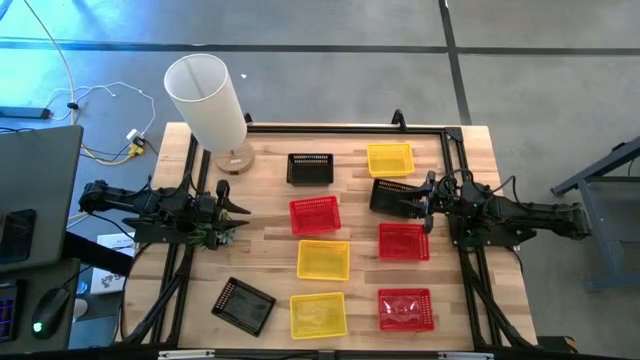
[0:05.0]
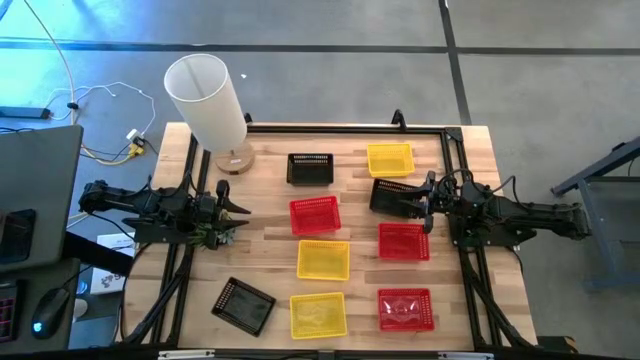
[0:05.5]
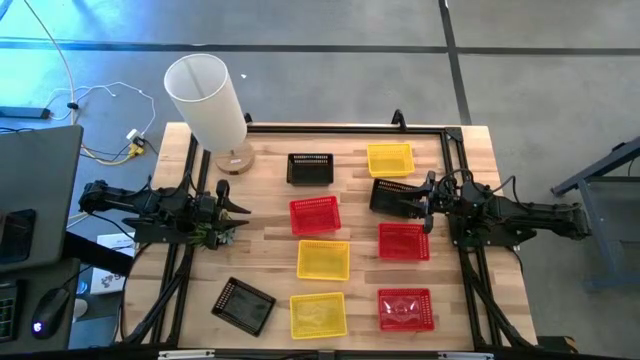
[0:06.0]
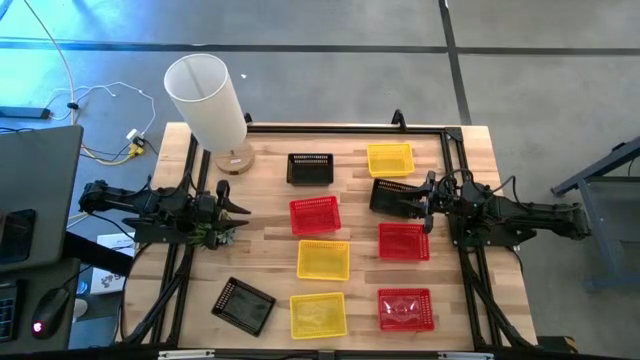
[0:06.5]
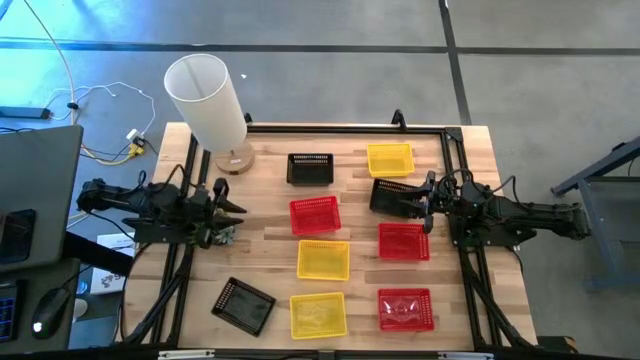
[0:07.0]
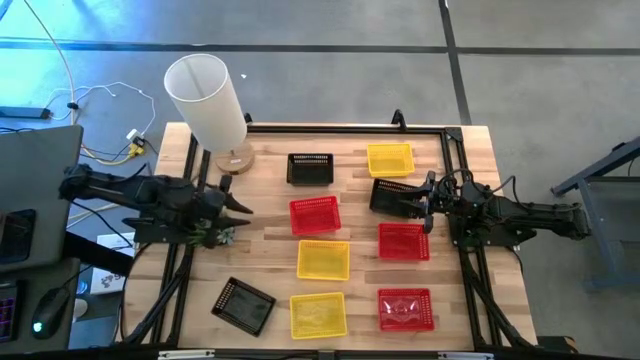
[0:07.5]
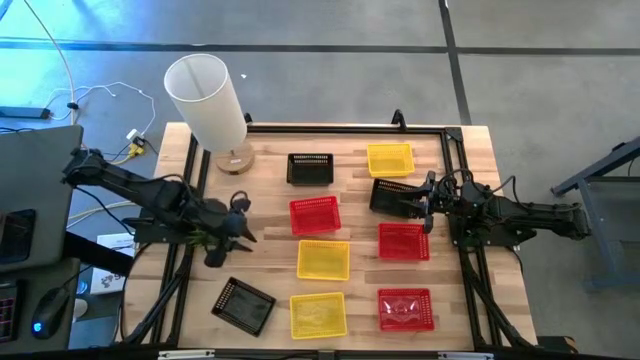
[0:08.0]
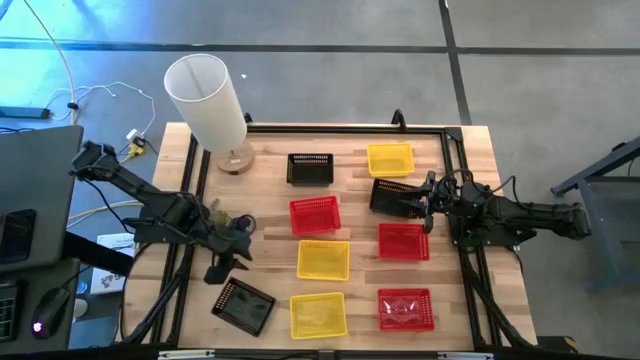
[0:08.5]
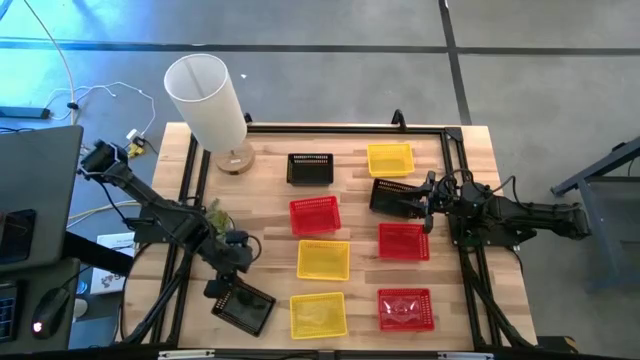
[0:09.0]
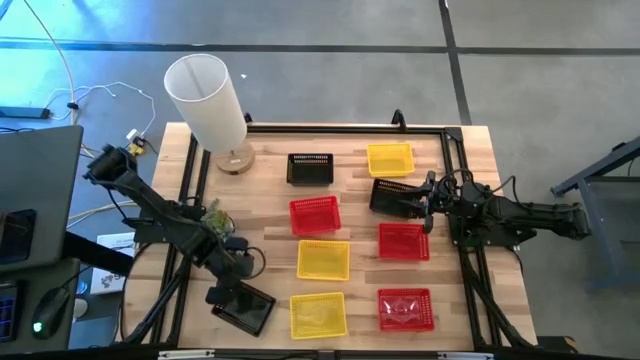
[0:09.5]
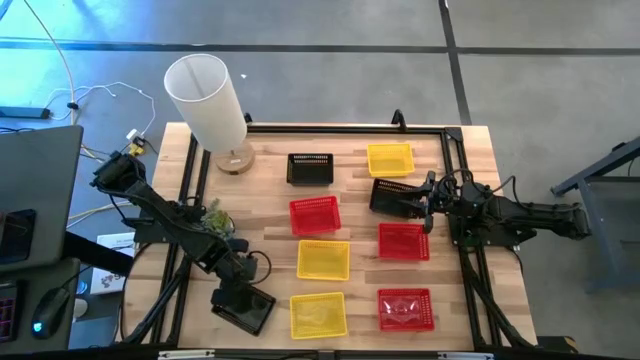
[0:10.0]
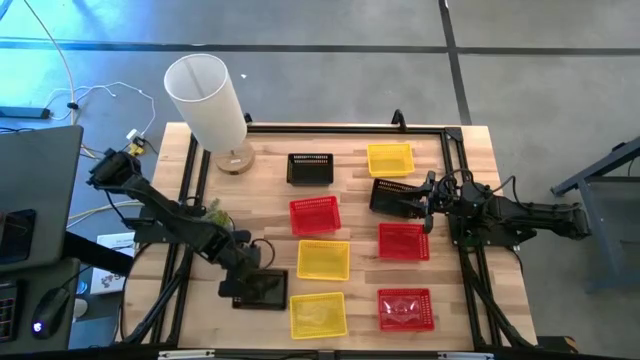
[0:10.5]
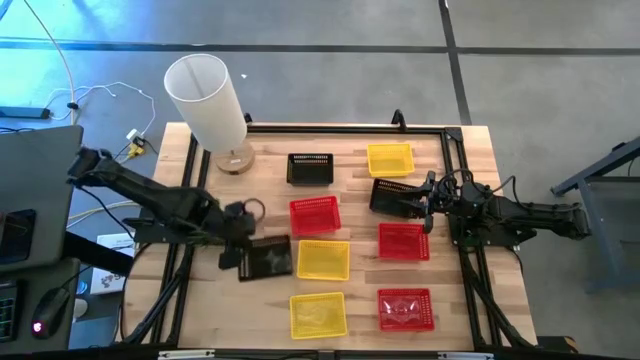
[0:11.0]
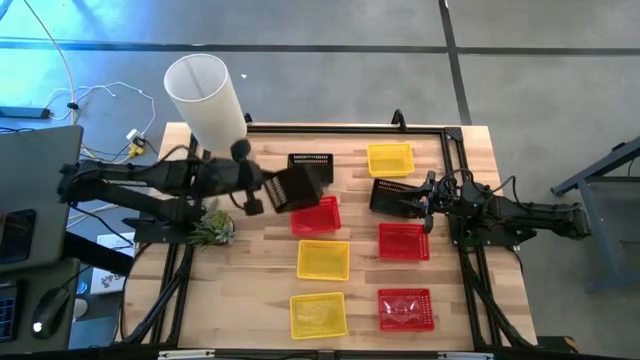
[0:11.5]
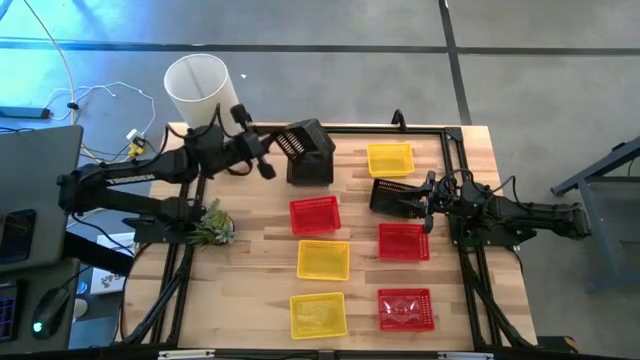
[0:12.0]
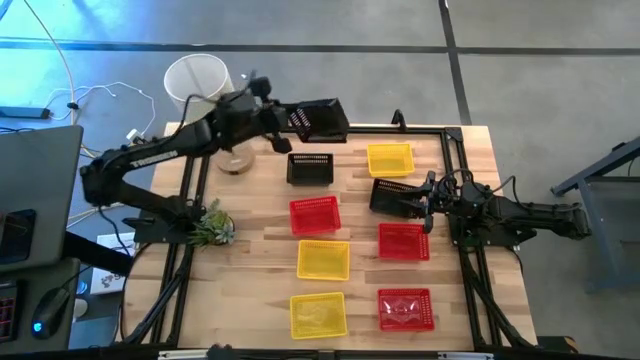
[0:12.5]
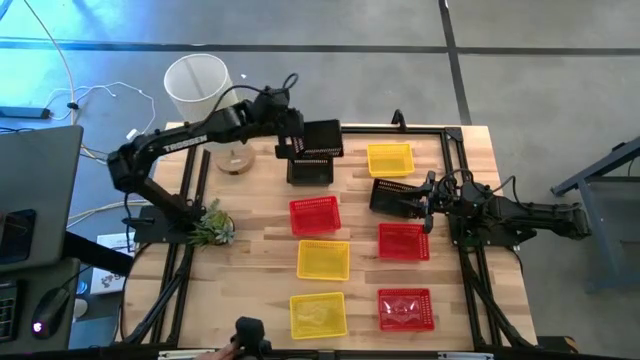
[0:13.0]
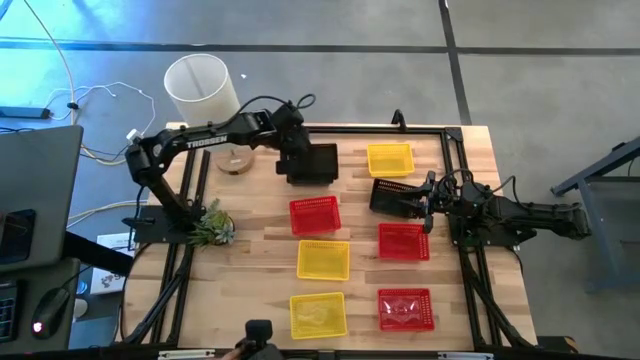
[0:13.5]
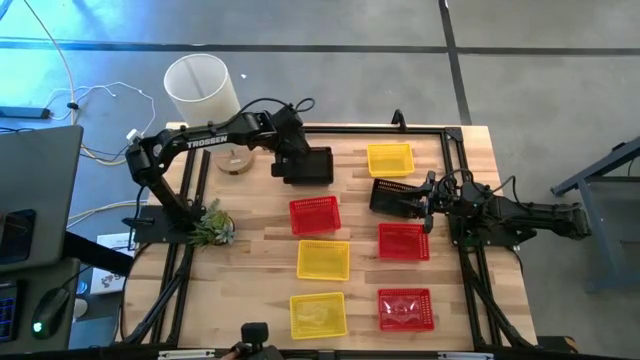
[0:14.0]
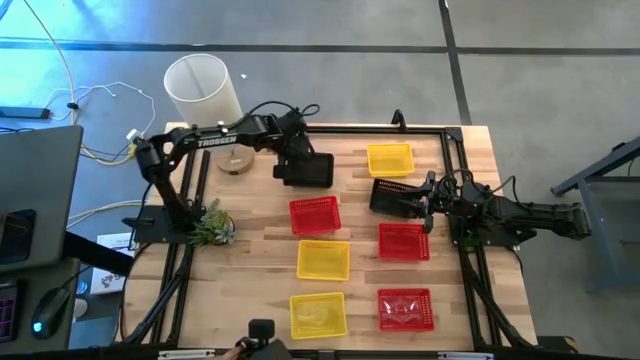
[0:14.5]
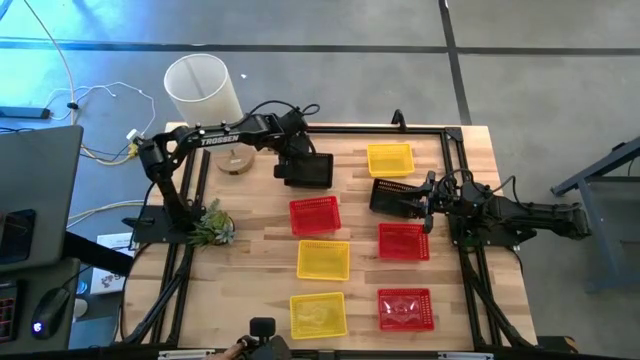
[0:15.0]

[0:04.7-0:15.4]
Stack the bottom black bin on top of the top black bin

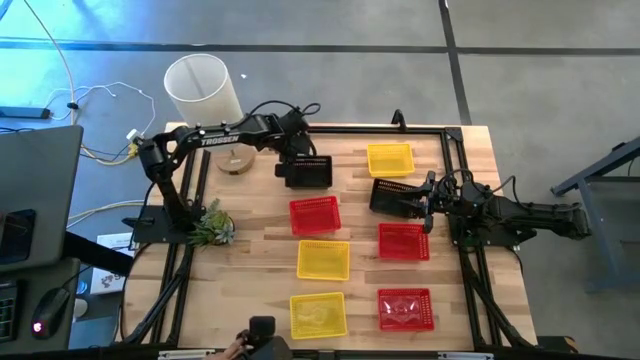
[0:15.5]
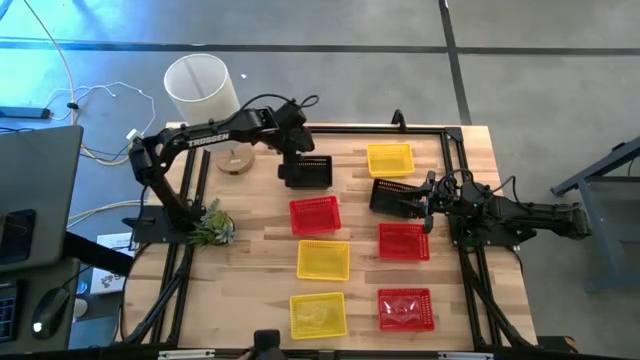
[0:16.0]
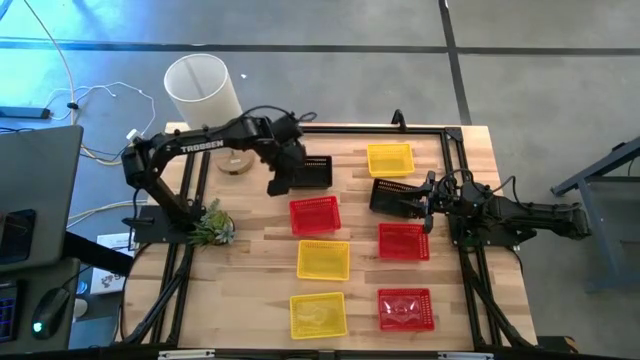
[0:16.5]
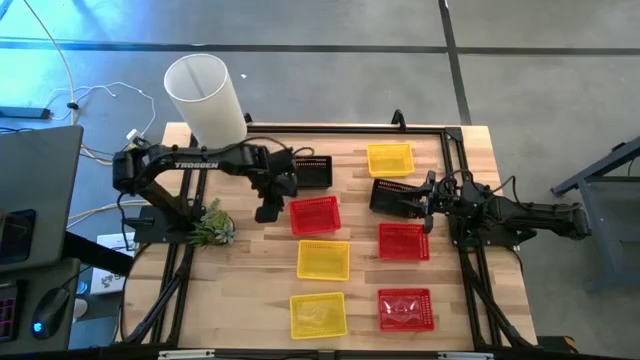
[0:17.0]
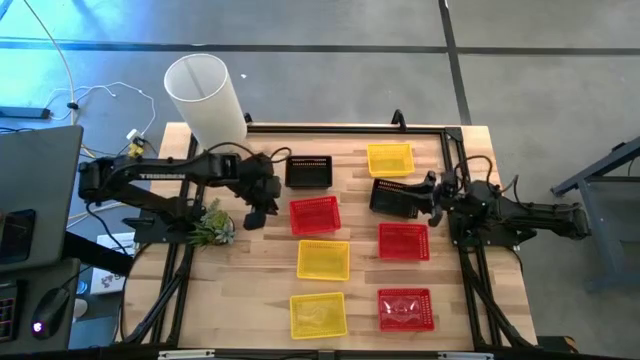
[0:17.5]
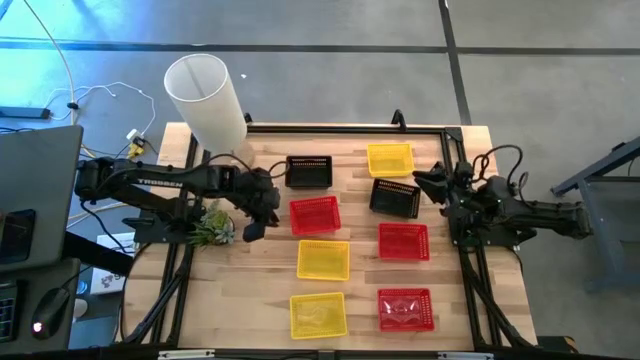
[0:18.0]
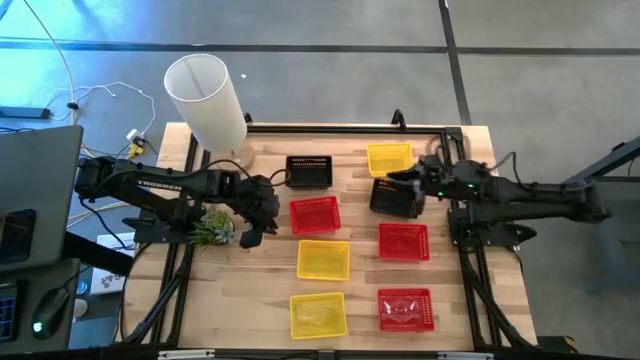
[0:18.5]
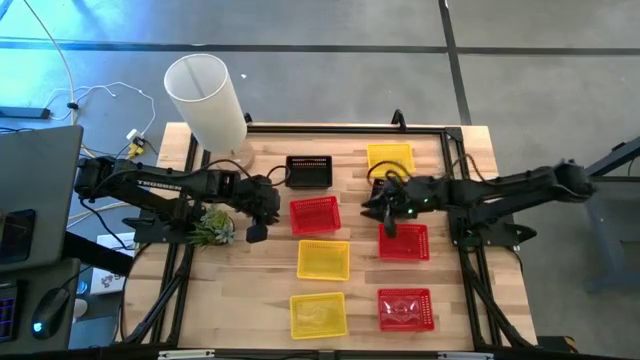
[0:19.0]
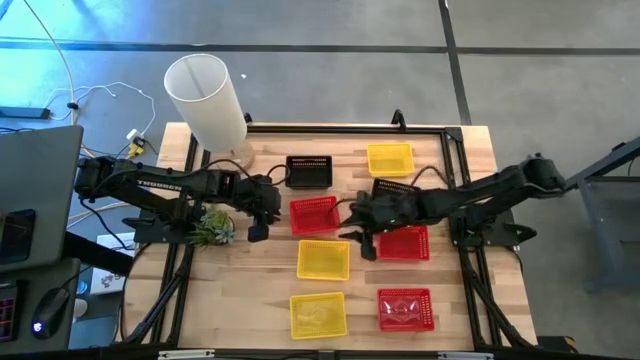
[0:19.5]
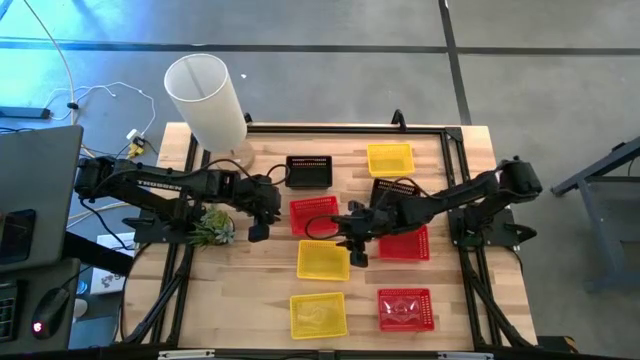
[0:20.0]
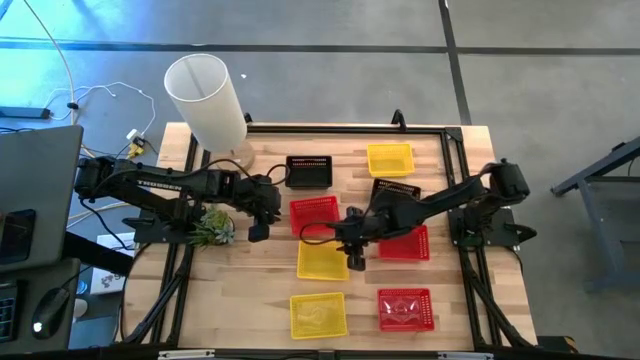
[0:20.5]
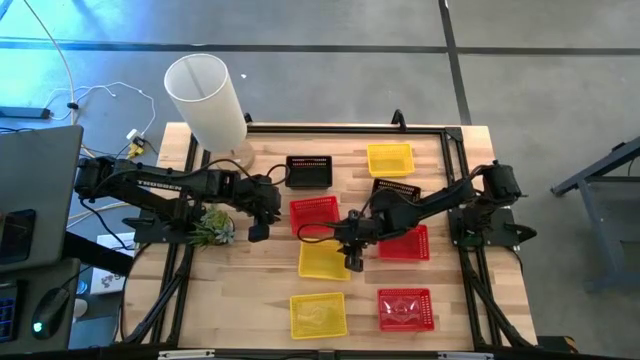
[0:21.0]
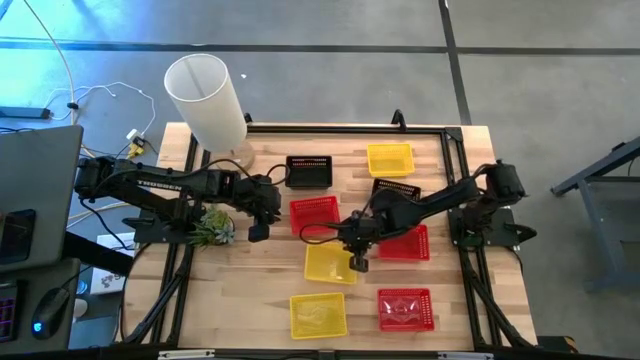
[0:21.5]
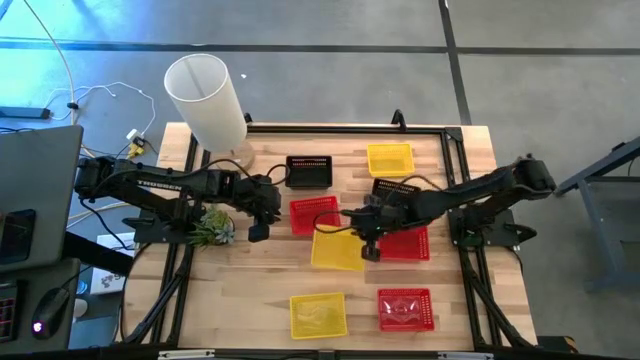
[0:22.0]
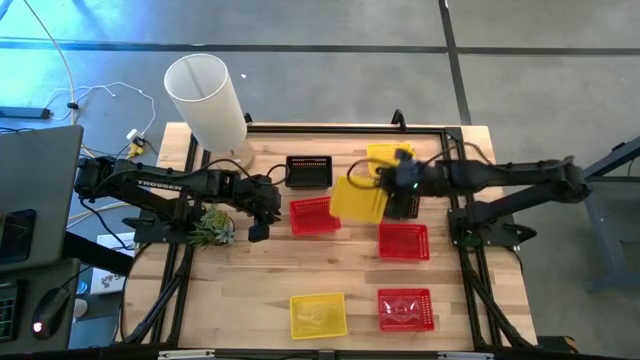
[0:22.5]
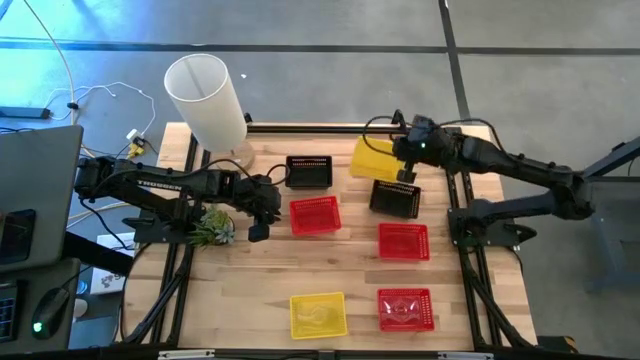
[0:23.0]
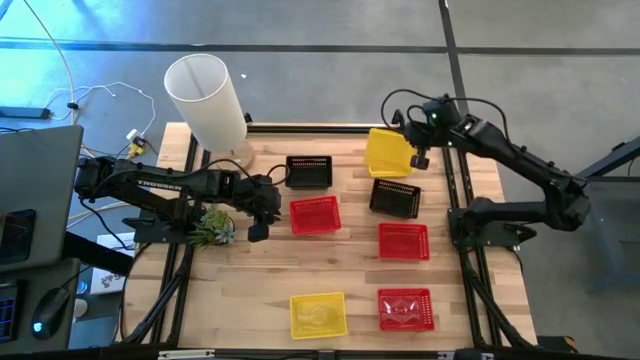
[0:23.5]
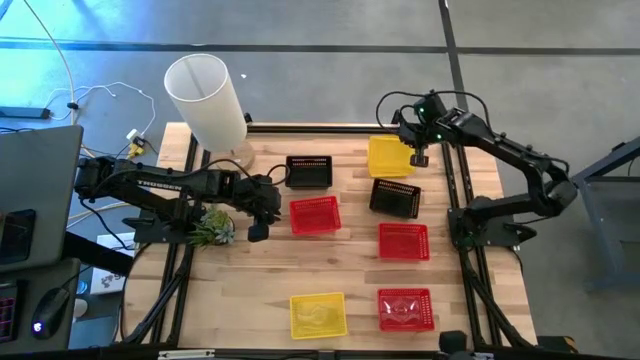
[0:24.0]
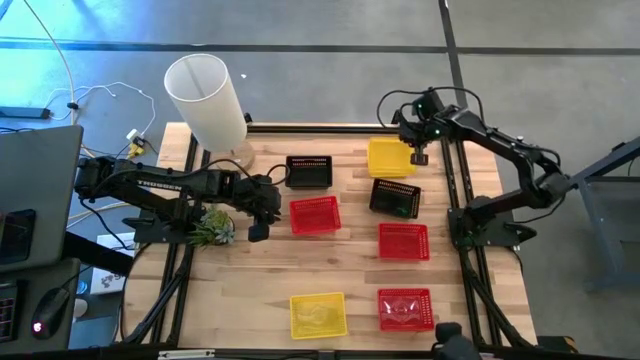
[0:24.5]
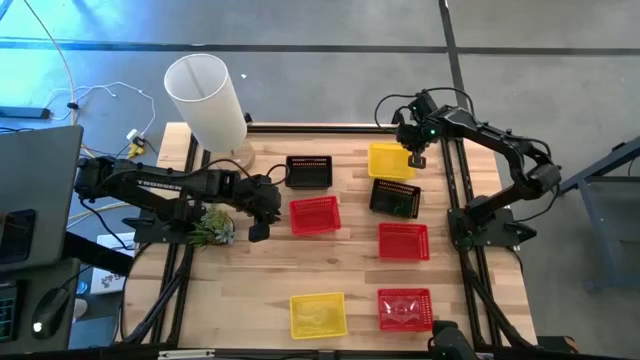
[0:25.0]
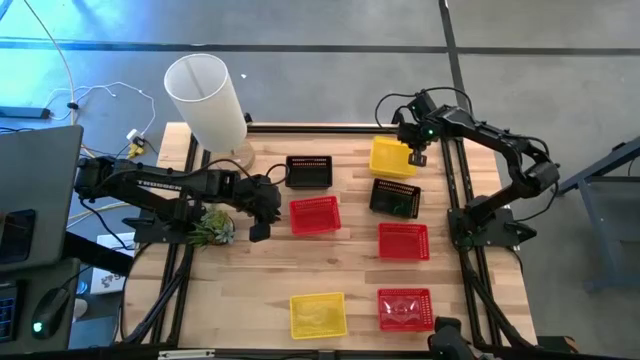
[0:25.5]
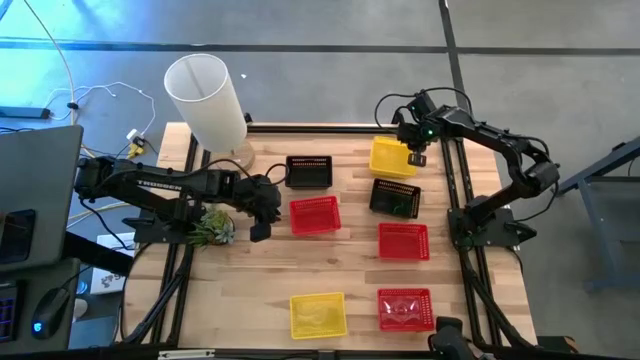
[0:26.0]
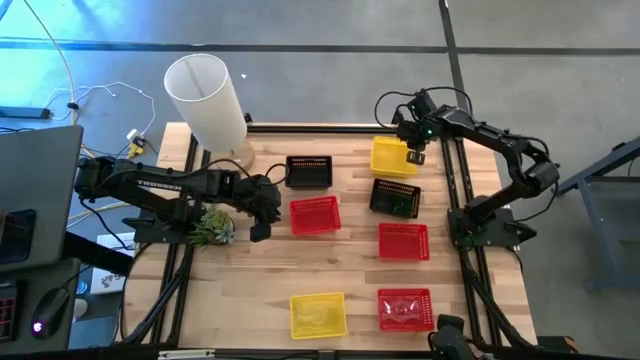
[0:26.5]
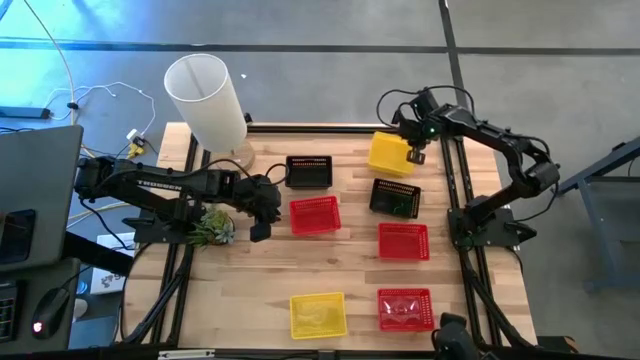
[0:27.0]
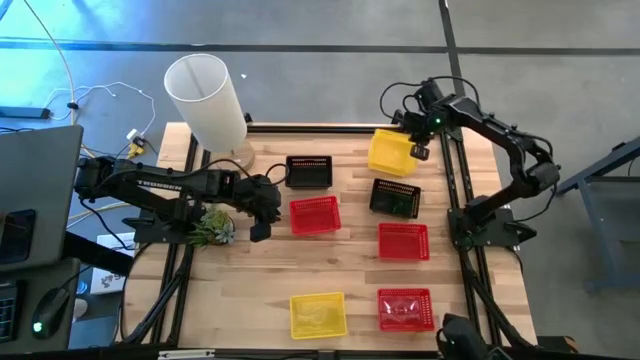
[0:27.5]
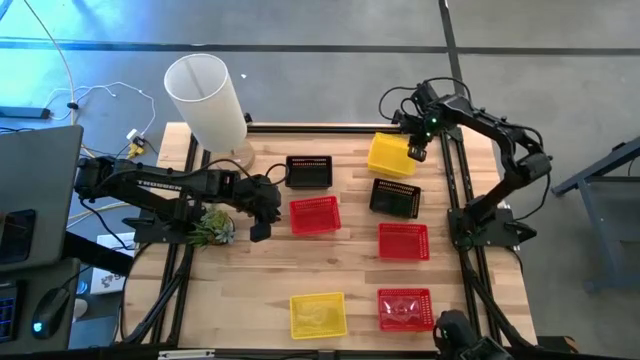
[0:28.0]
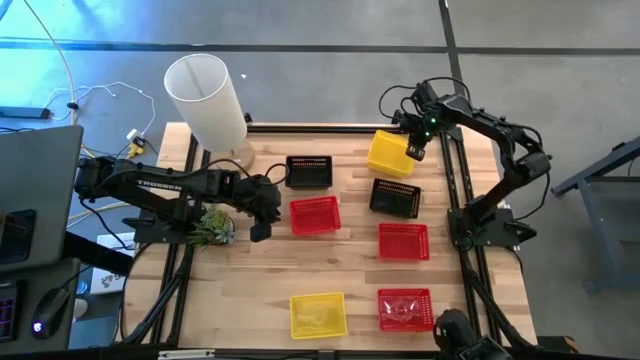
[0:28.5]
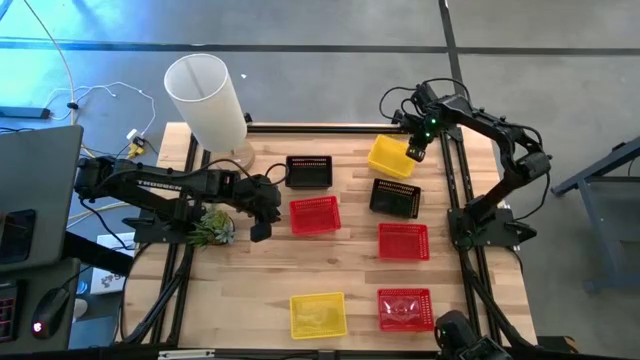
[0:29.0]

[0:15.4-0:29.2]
Stack the middle yellow bin on top of the top yellow bin
